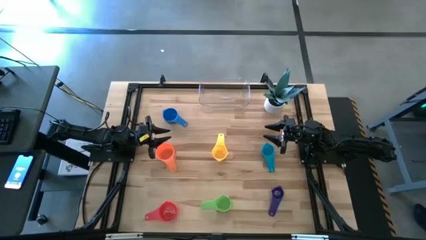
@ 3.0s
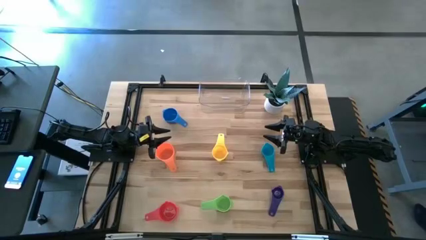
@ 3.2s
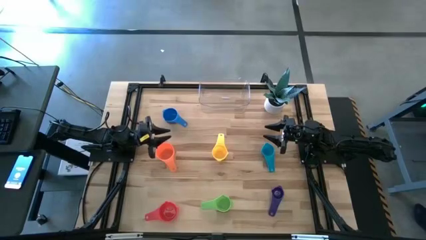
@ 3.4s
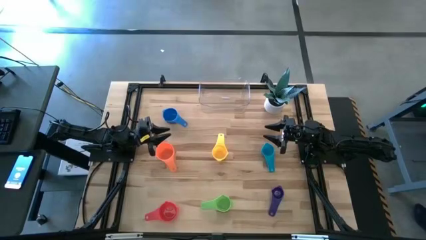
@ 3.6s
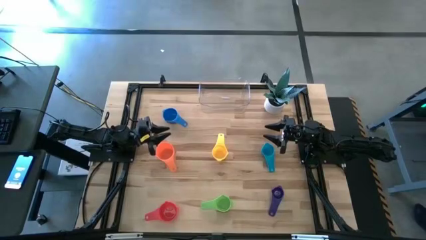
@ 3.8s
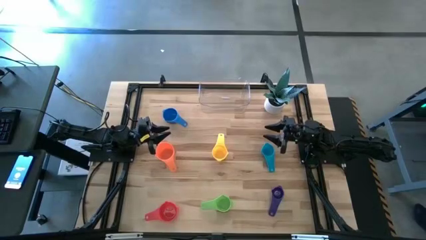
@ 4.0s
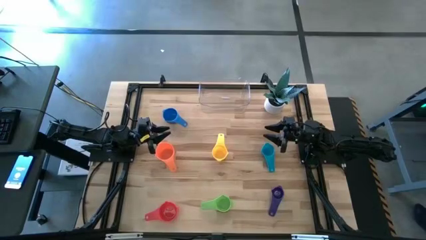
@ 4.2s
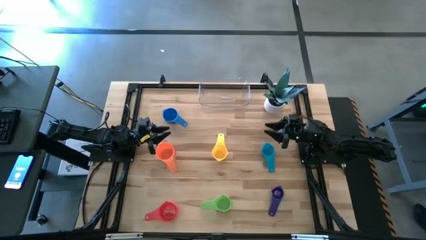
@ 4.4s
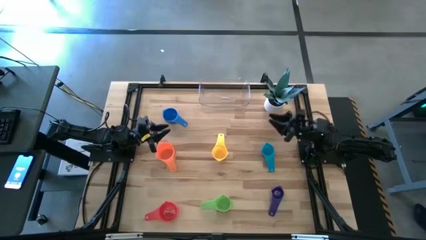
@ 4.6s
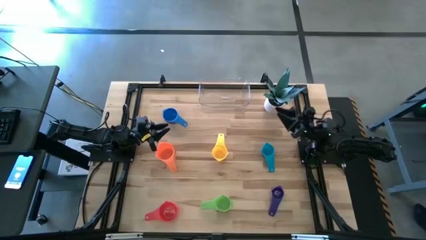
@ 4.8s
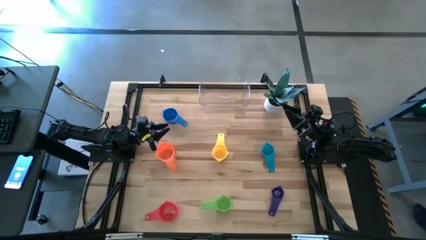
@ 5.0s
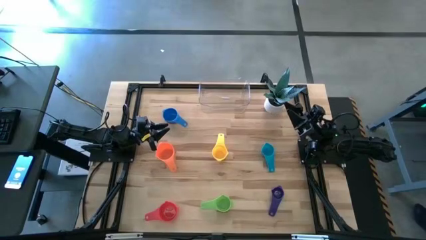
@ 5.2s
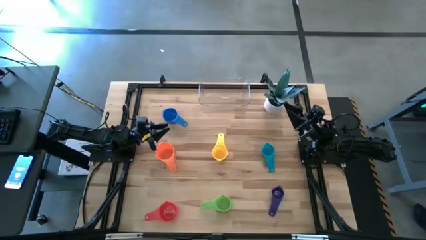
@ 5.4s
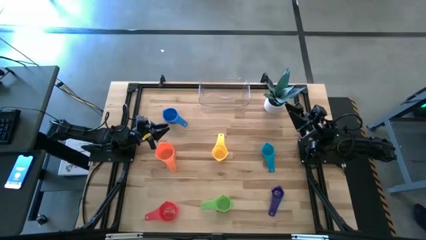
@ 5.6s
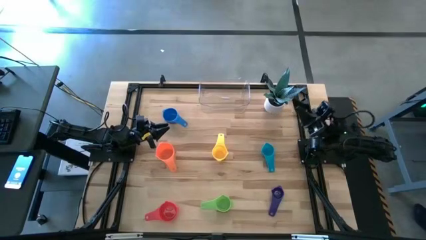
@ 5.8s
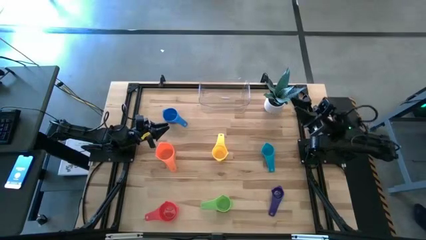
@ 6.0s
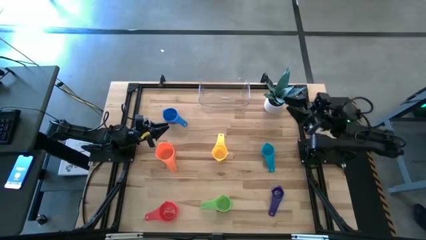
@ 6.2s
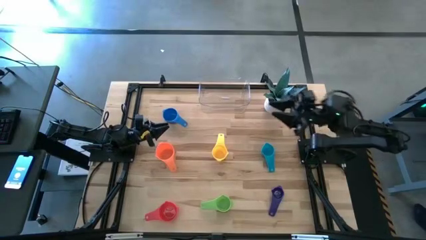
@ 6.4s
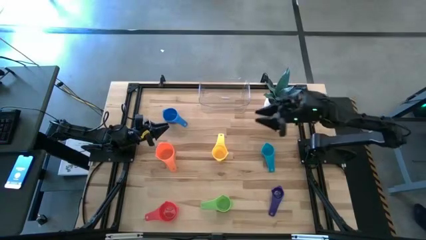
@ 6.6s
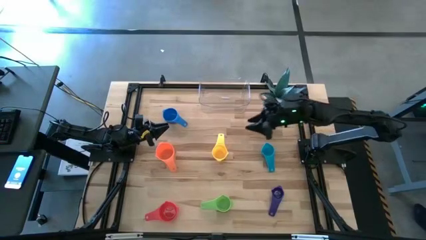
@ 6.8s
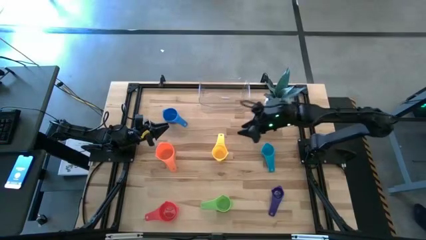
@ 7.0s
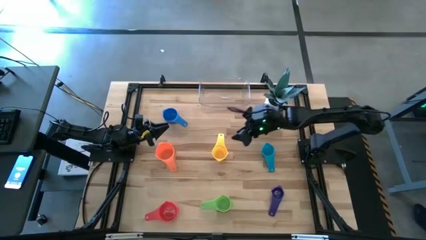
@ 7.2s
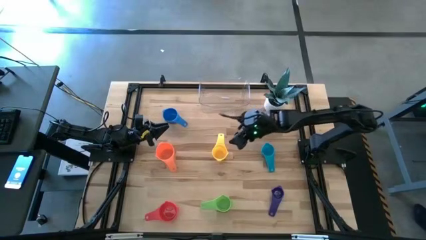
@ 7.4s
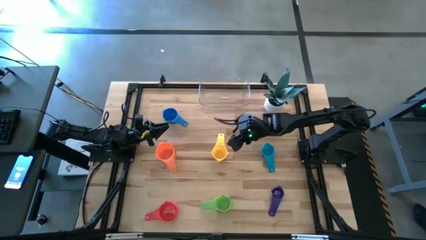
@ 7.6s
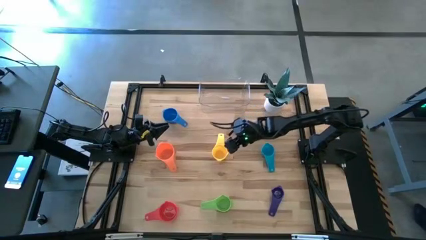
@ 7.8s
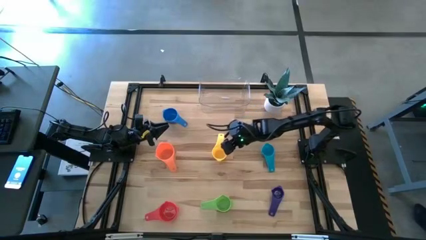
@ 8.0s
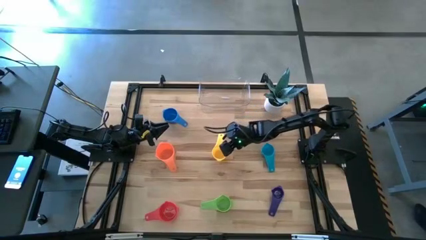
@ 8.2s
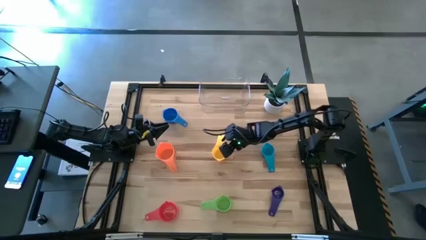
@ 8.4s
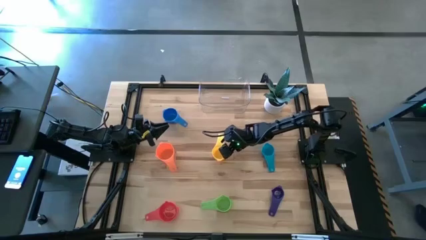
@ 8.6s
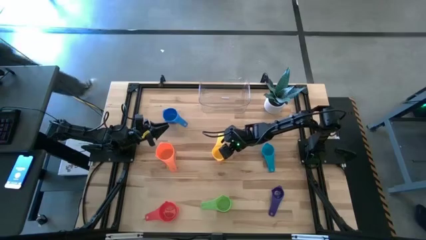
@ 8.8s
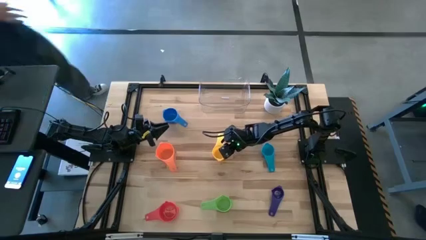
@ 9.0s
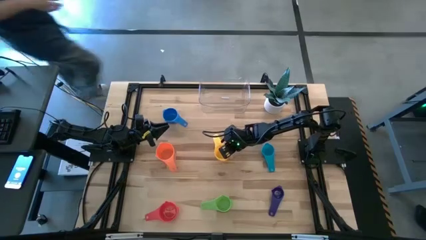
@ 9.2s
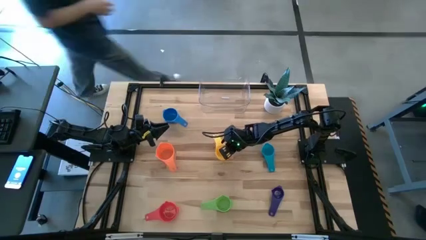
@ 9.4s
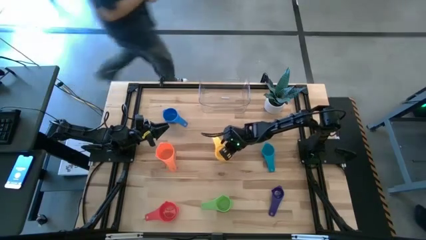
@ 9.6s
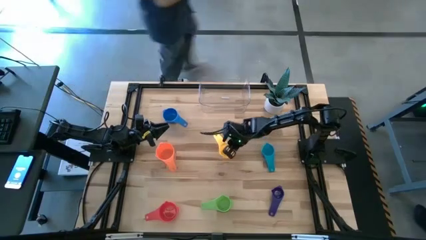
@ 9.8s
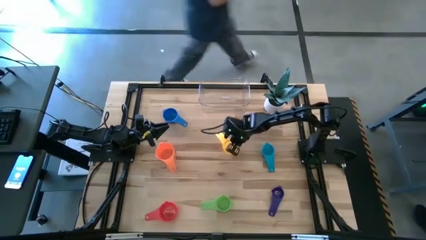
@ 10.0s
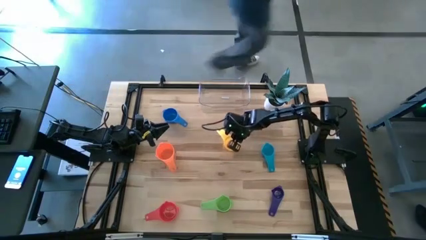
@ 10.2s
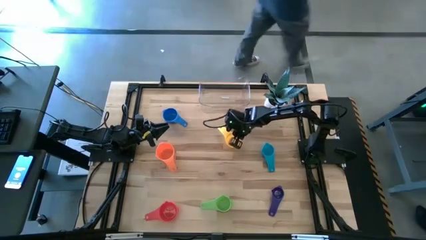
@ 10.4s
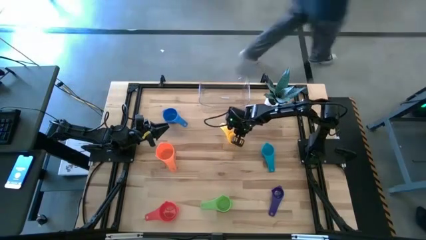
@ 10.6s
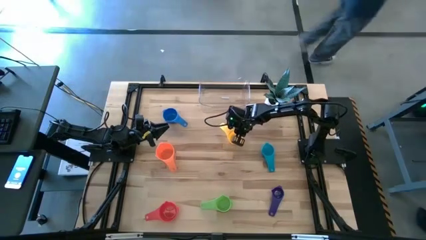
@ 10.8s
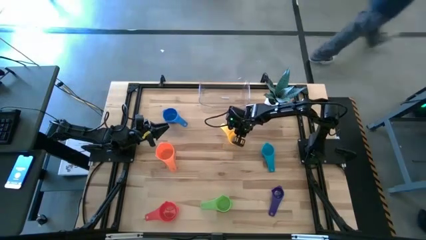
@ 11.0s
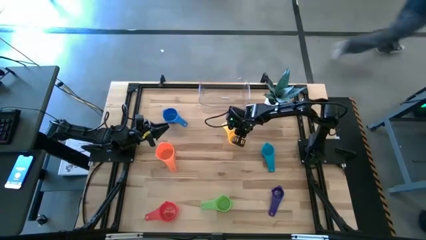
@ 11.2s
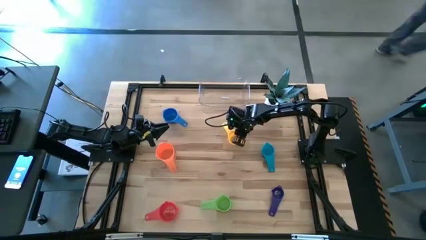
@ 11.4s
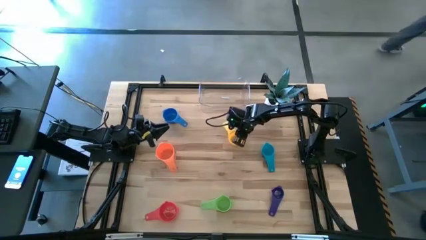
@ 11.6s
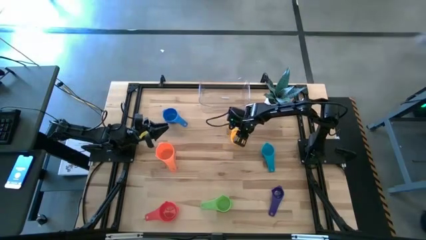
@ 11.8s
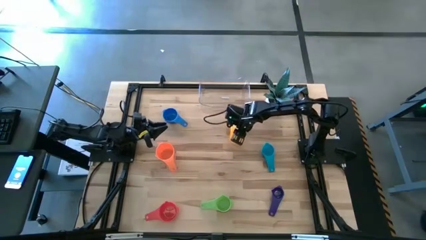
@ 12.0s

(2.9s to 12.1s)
Task: Nest measuring cups in basket
Move the yellow measuring cup to the top center of the table

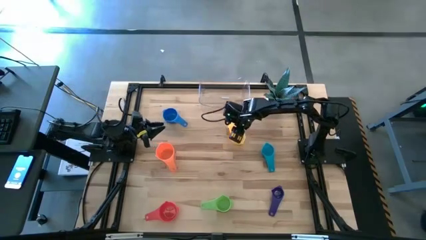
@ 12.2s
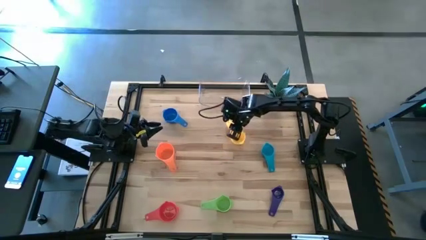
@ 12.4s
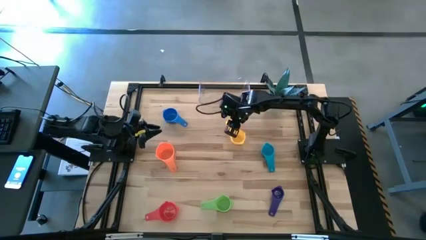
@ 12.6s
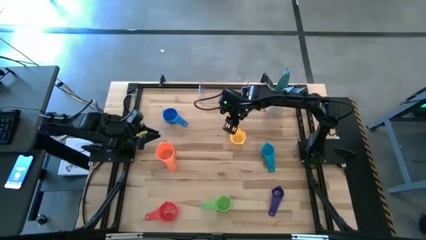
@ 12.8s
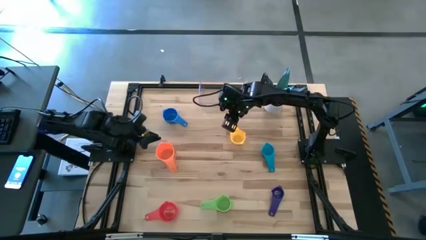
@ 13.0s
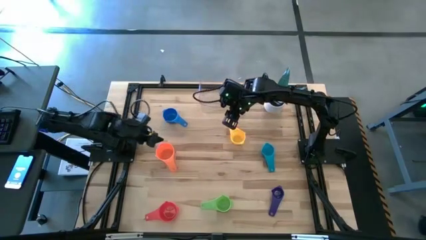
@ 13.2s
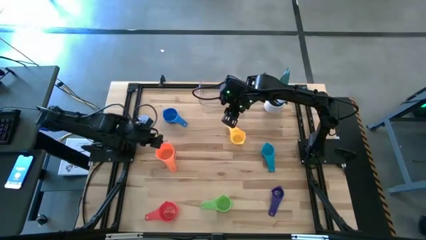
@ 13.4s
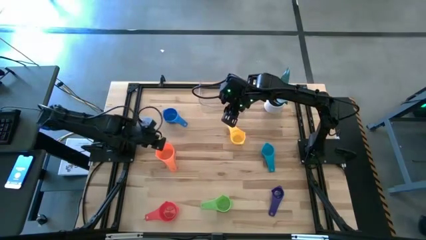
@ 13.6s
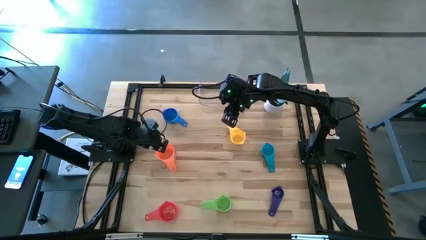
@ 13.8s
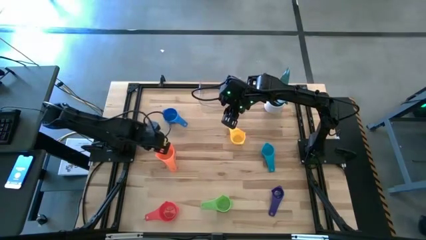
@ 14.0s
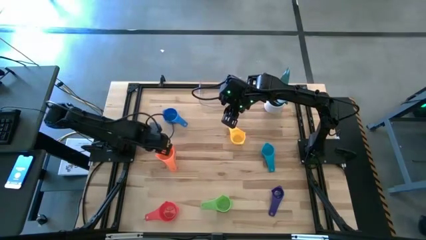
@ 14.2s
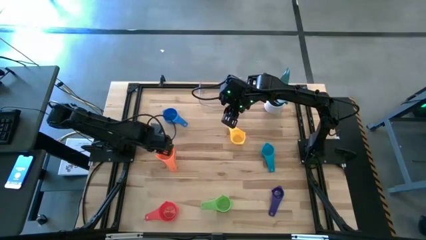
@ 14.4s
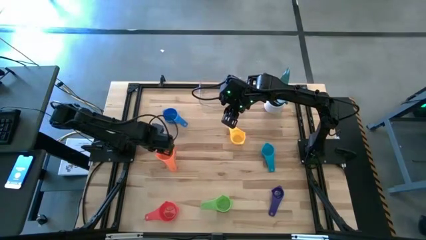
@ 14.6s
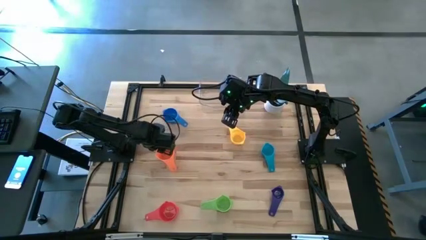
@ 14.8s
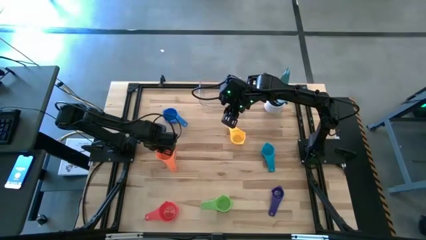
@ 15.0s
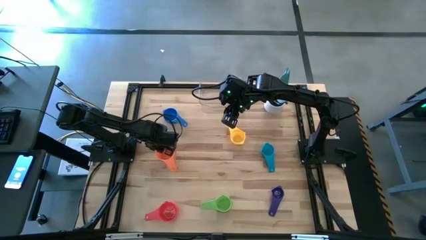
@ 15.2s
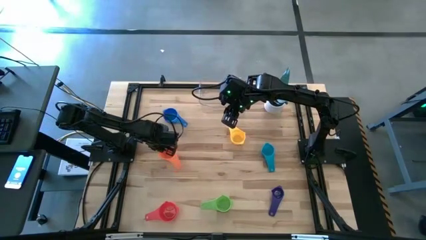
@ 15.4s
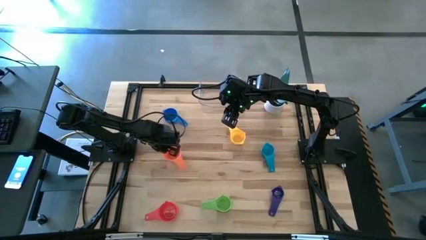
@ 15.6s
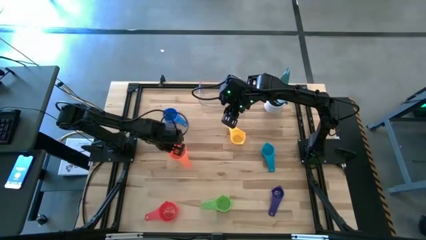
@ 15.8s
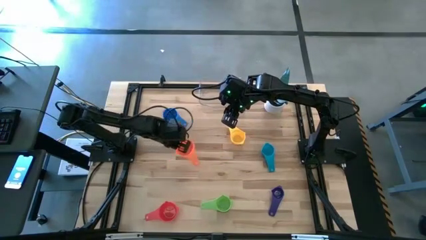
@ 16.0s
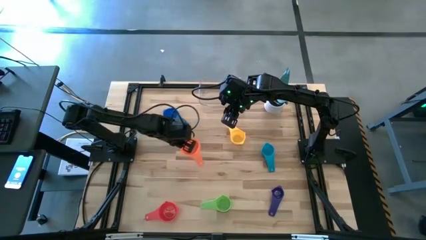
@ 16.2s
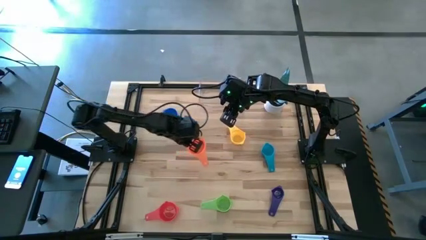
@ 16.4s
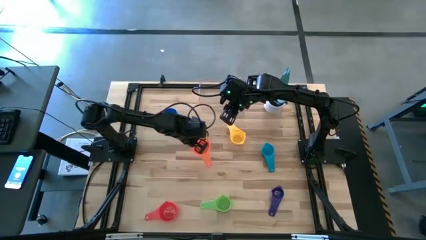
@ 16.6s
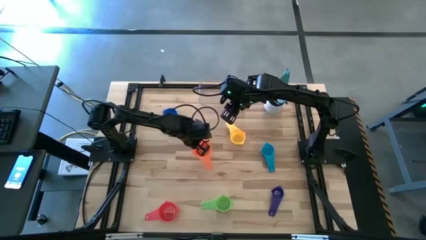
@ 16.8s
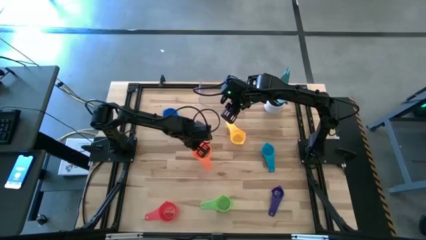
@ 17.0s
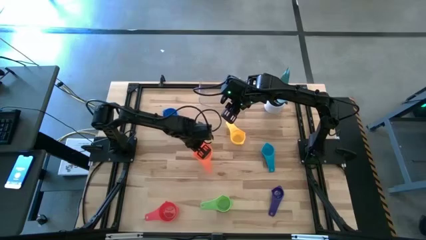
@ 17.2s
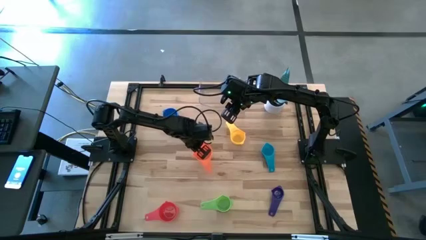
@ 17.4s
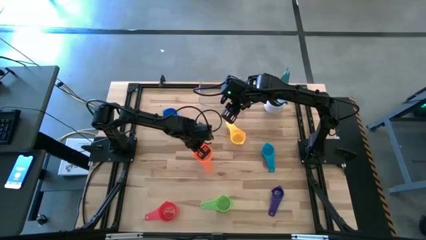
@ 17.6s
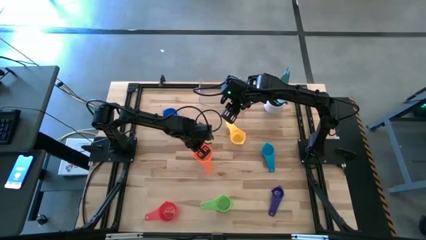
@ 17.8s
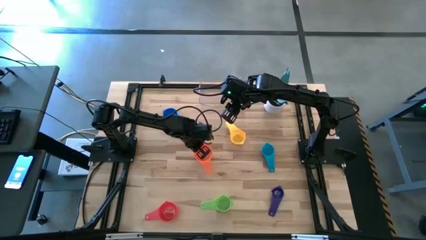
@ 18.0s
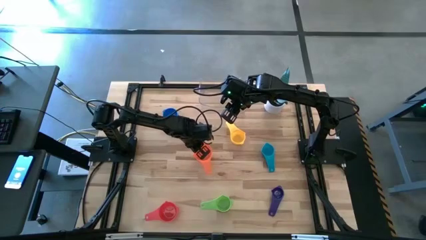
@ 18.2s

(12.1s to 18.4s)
Move the orange measuring cup to the center of the table

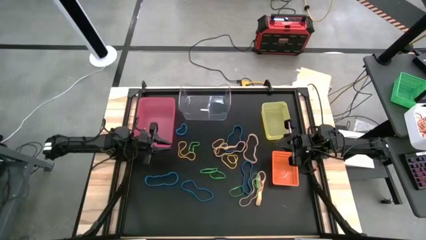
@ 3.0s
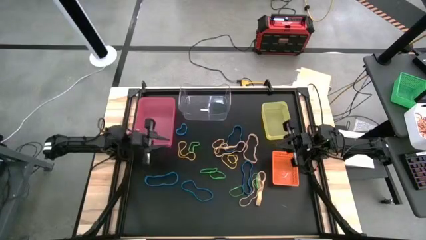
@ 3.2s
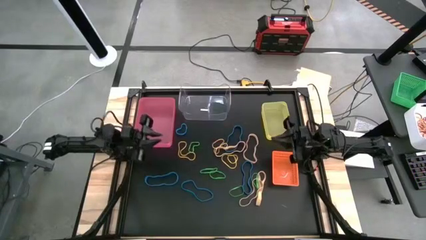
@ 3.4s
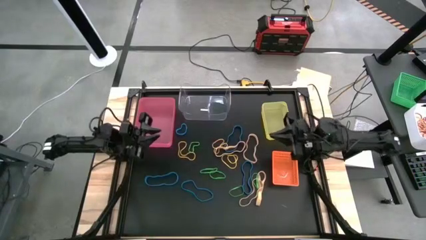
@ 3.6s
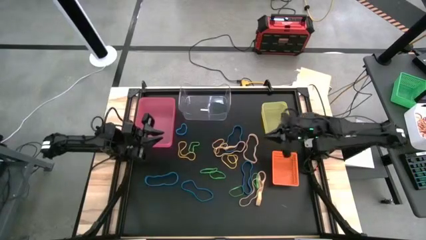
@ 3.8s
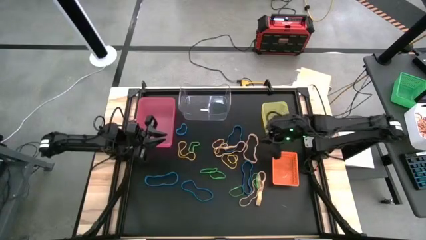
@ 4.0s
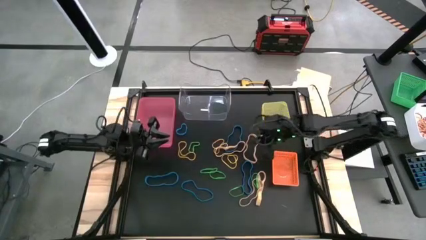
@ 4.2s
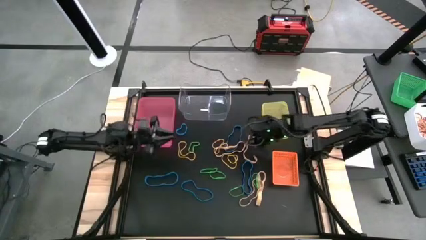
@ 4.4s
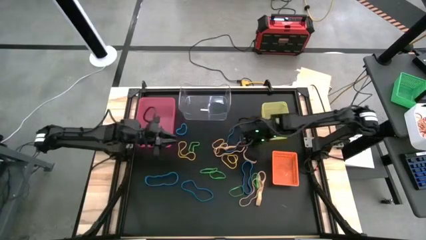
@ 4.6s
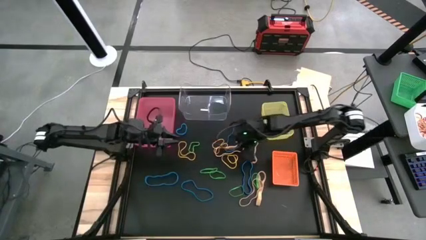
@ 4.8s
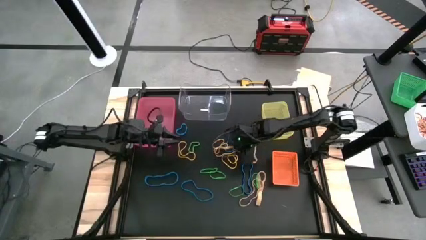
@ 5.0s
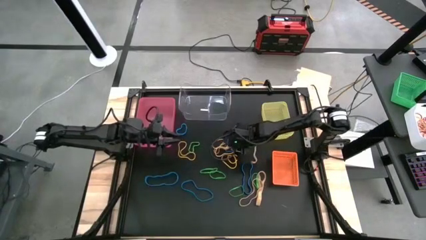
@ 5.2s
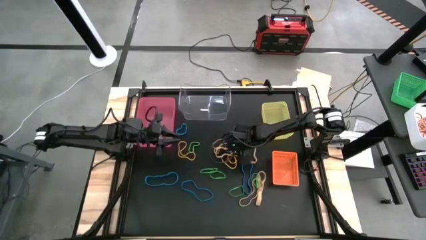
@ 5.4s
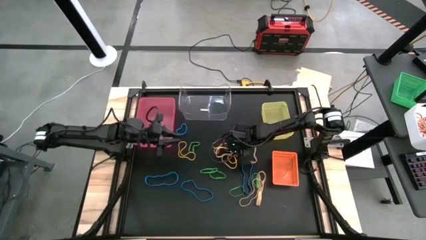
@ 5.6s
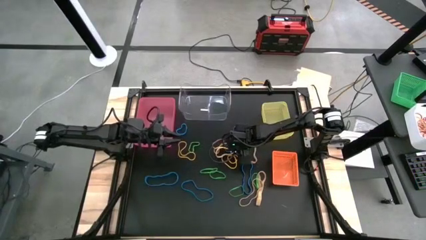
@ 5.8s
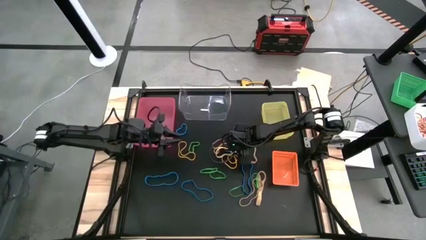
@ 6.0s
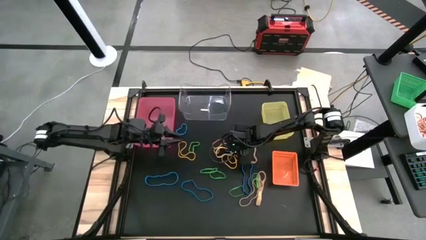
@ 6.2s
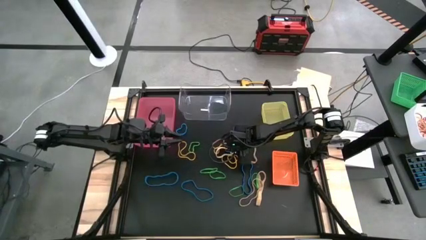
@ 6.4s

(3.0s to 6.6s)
Task: Sort rubber bands into baskets
Put the light orange rubber band into the yellow bin
